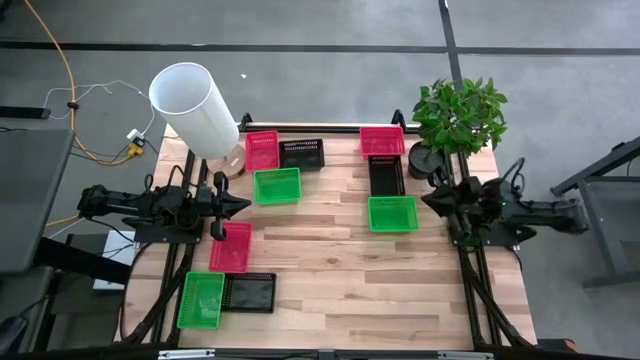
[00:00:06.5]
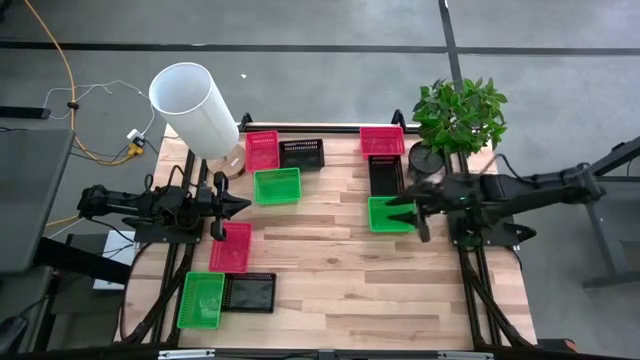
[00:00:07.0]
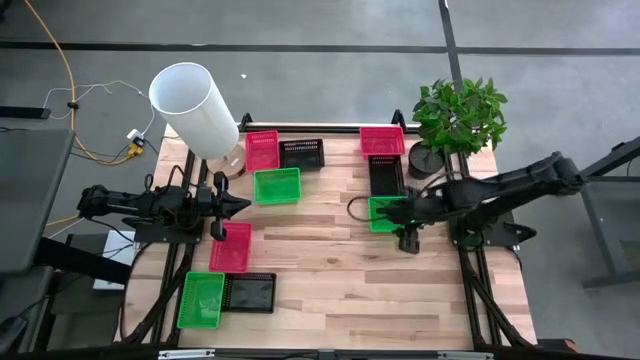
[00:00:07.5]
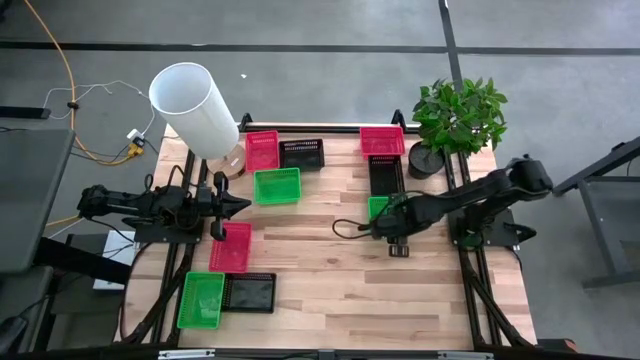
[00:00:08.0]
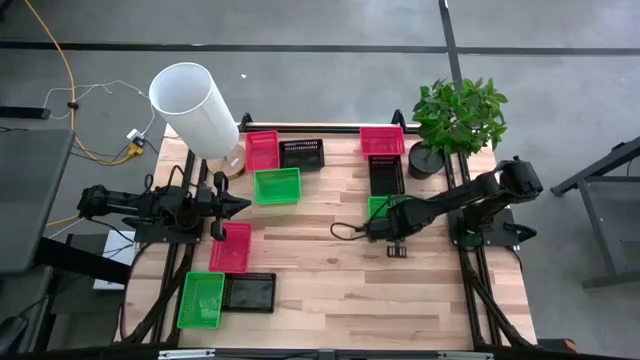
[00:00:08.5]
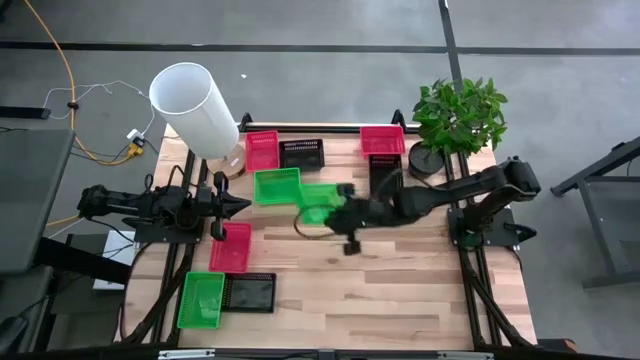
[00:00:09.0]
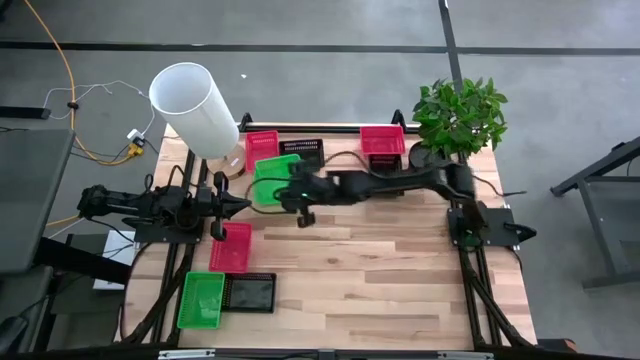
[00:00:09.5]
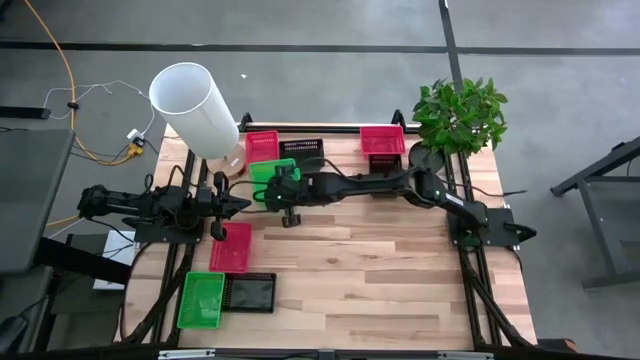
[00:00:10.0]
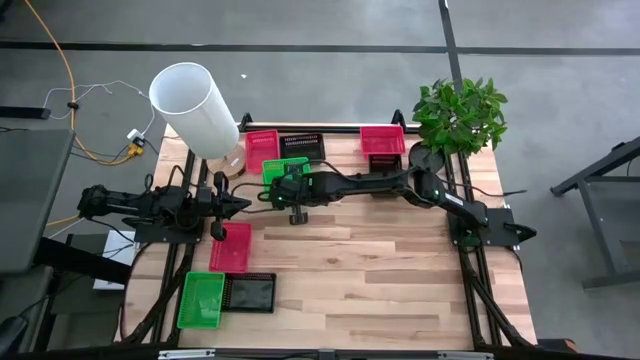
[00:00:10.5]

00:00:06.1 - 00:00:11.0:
Stack the right green basket on top of the top green basket

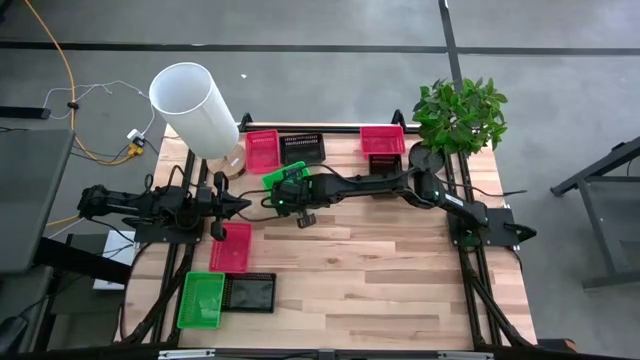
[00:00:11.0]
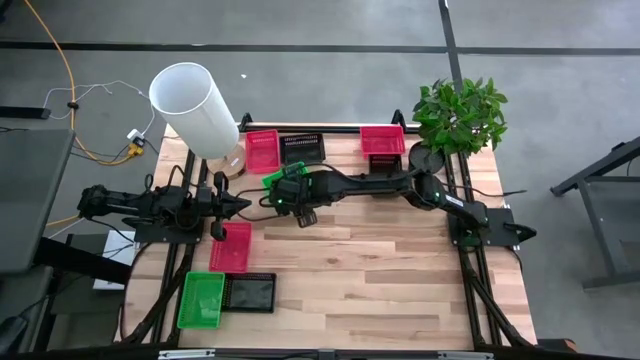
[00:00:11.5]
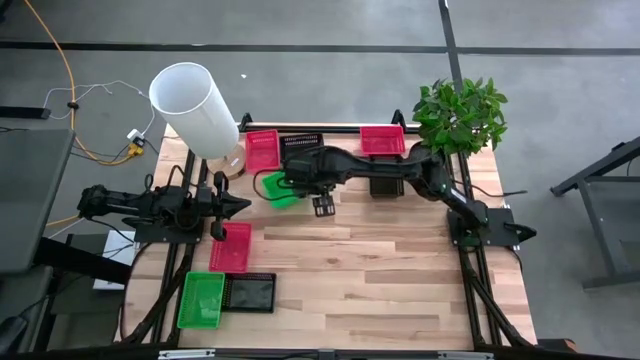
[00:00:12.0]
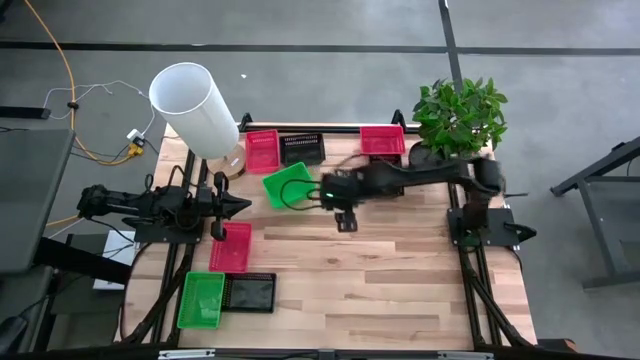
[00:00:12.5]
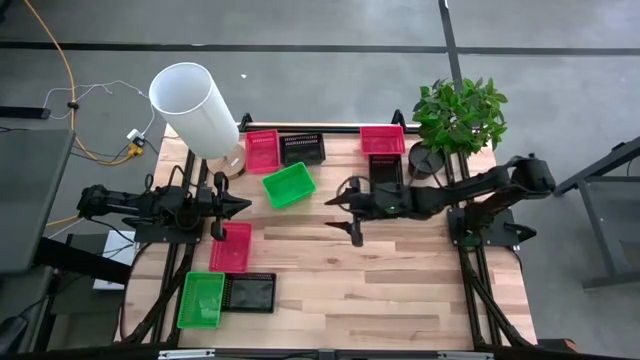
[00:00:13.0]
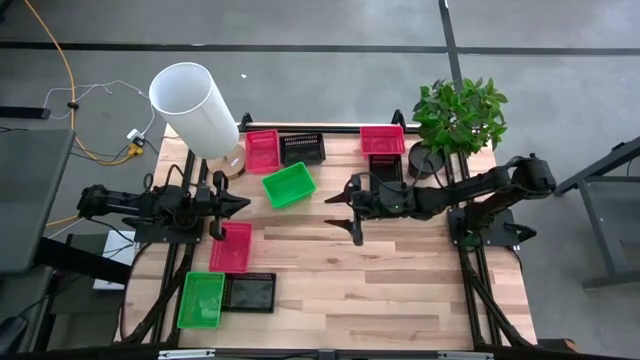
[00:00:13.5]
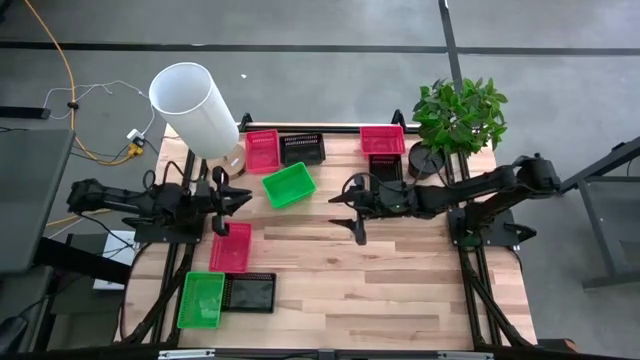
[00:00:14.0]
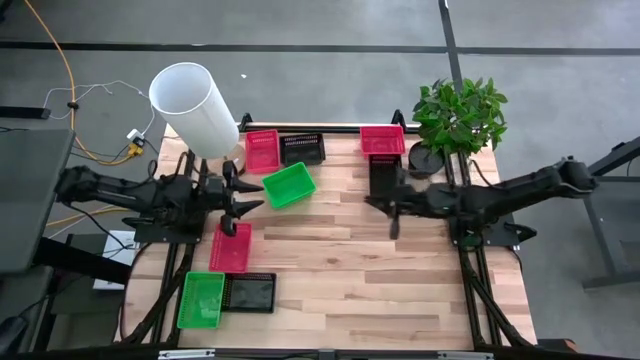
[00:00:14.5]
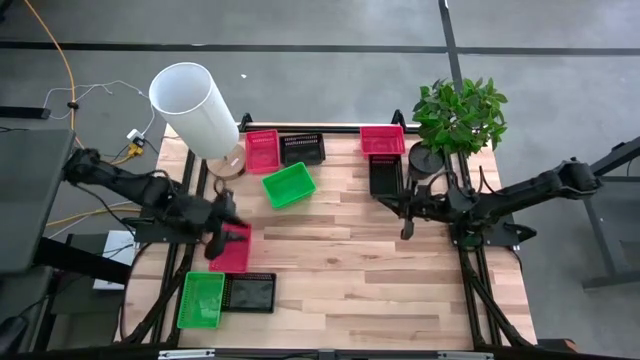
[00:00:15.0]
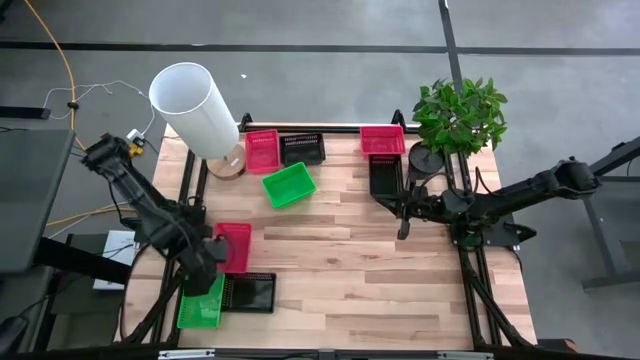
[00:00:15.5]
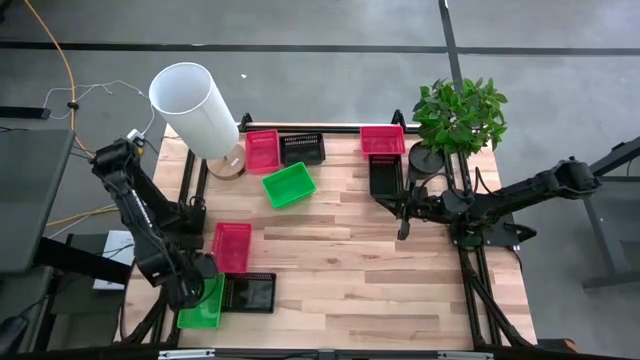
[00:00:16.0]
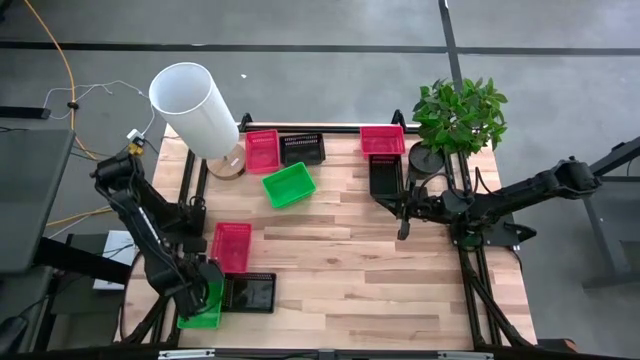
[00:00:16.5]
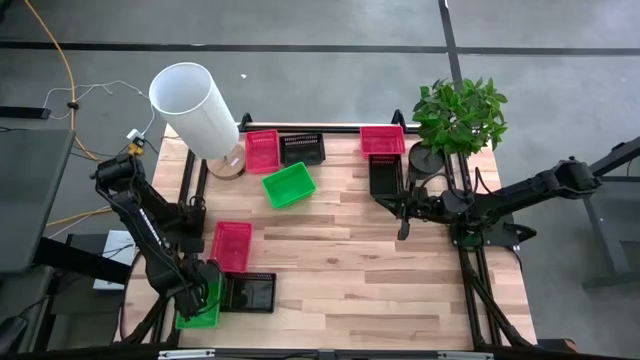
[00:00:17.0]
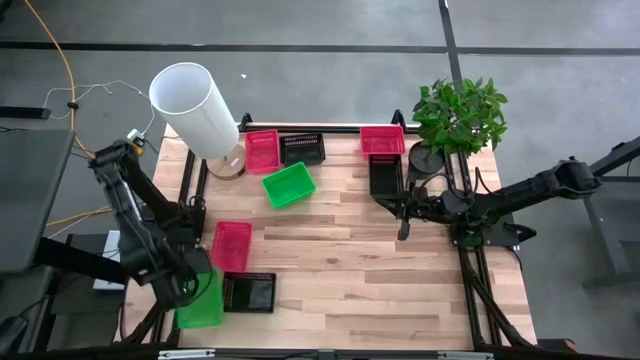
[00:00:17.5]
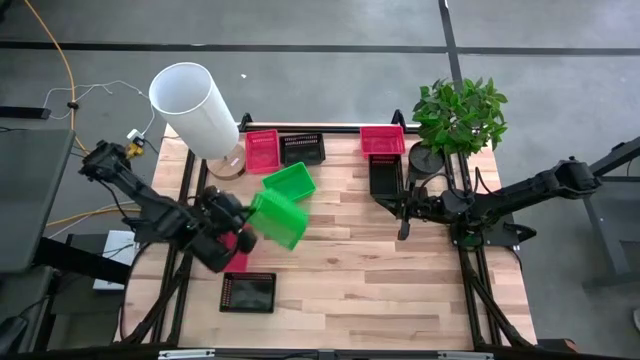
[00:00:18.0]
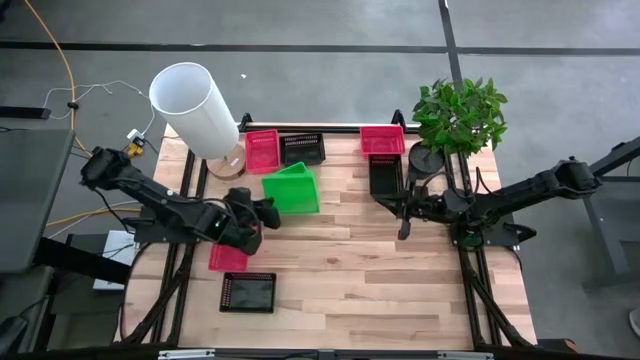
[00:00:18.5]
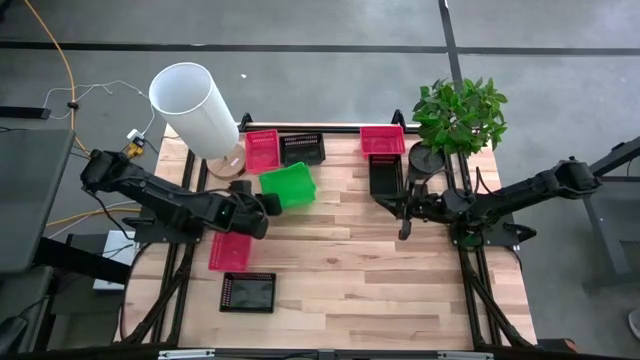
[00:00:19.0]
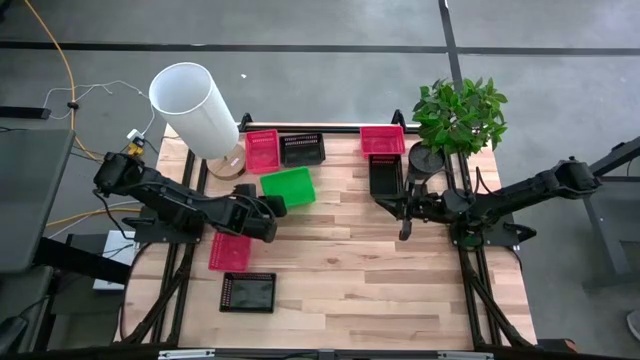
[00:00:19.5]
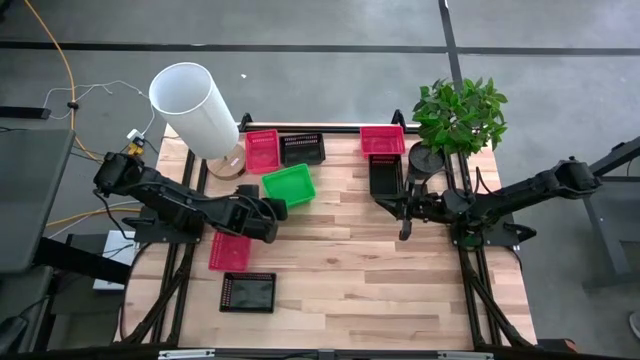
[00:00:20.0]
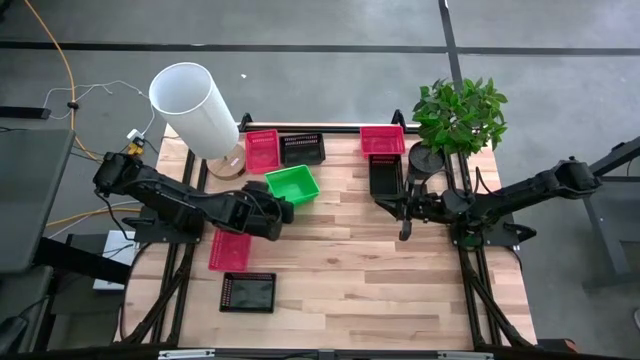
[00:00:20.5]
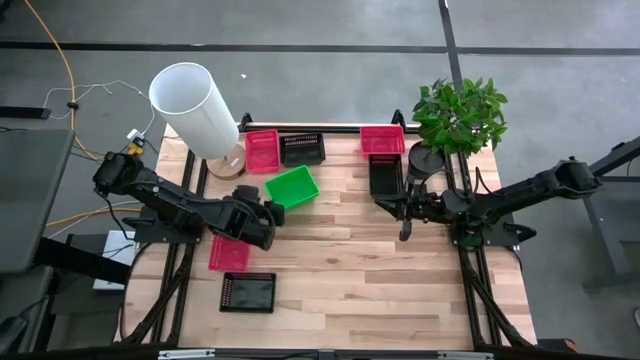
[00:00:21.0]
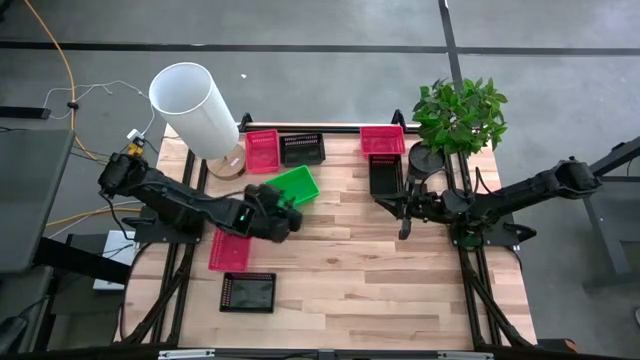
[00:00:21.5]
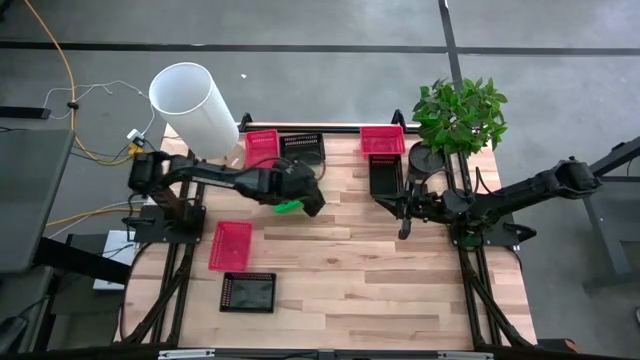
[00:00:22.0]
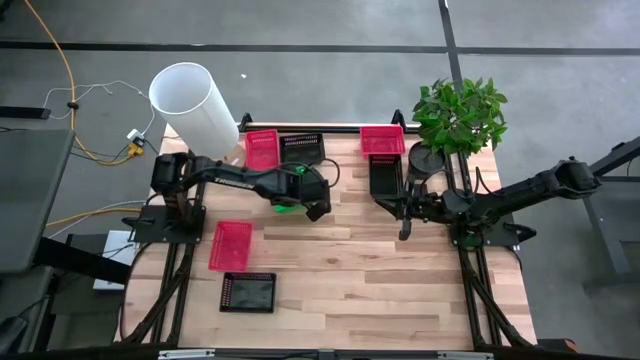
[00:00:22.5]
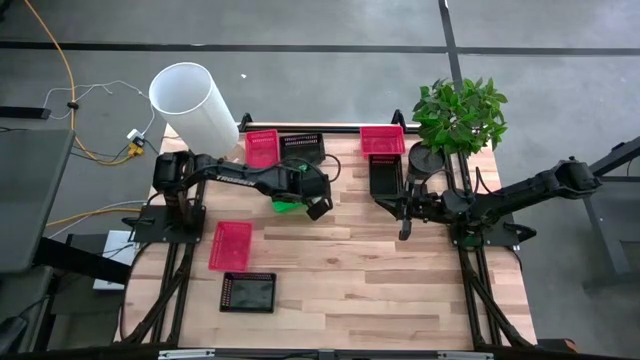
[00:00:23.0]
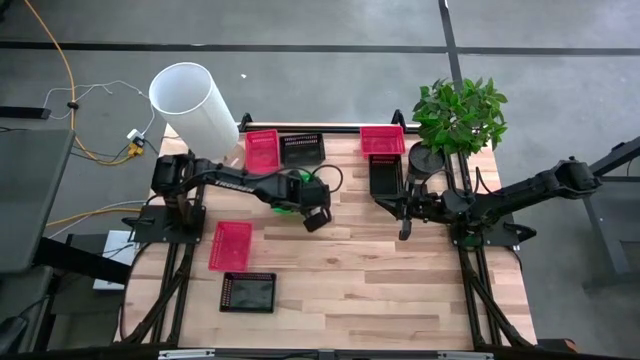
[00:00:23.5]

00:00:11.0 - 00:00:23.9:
Stack the bottom green basket on top of the top green basket

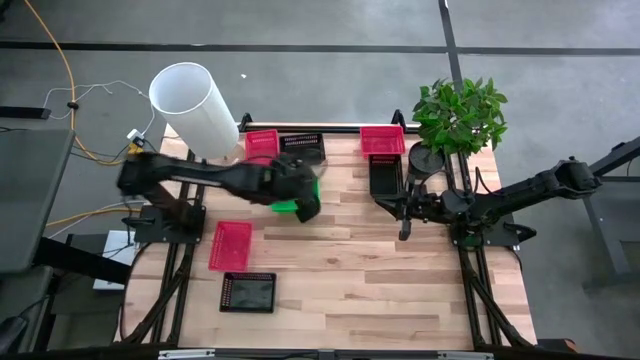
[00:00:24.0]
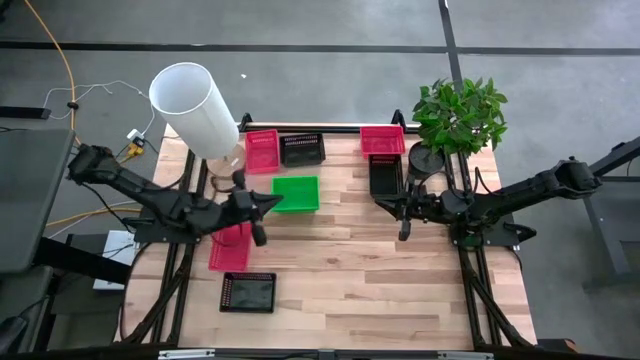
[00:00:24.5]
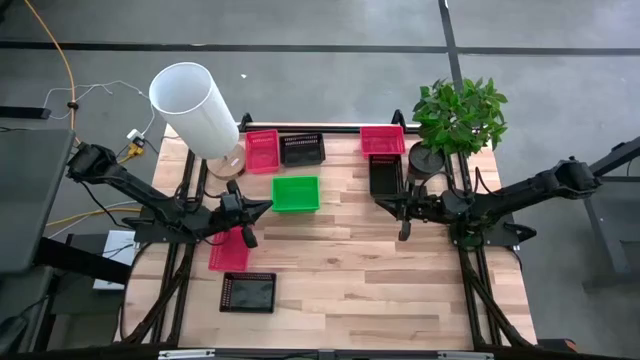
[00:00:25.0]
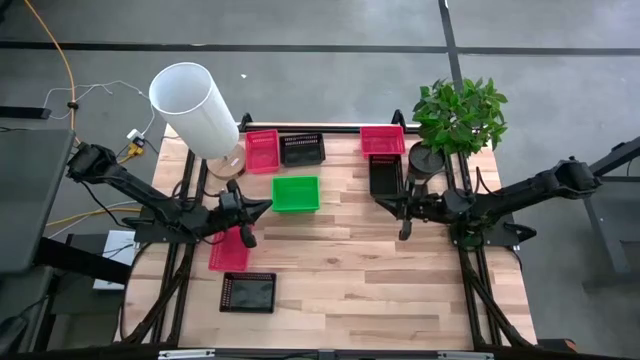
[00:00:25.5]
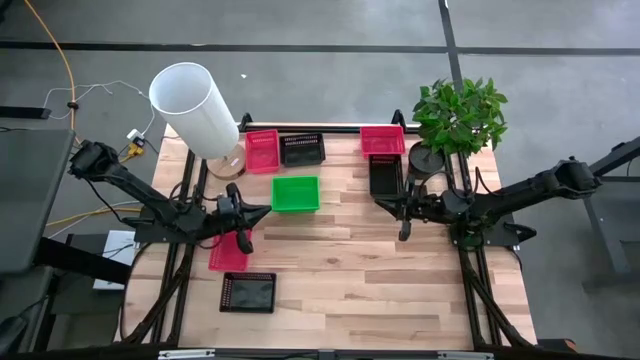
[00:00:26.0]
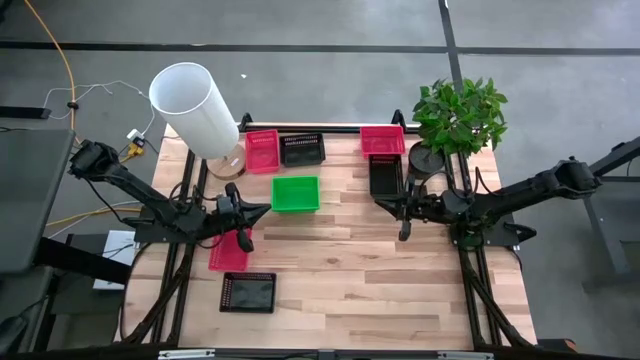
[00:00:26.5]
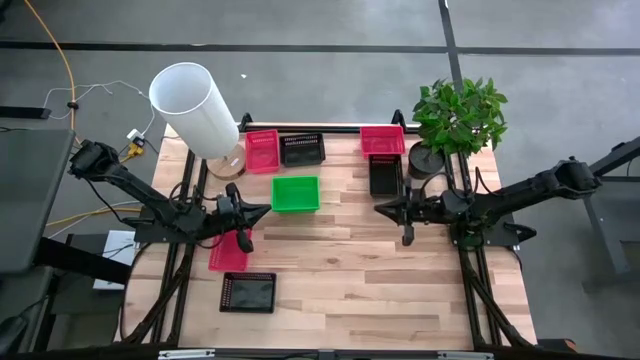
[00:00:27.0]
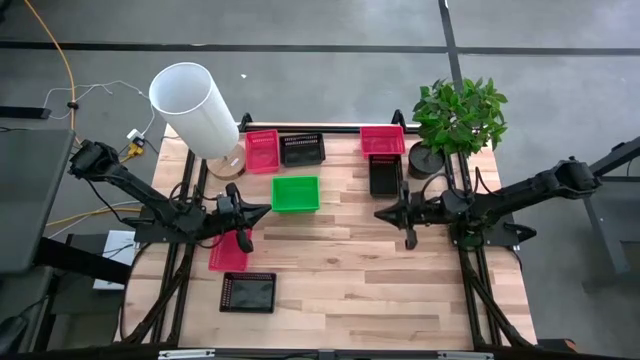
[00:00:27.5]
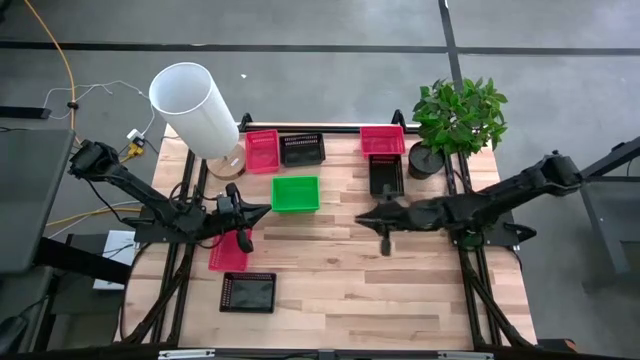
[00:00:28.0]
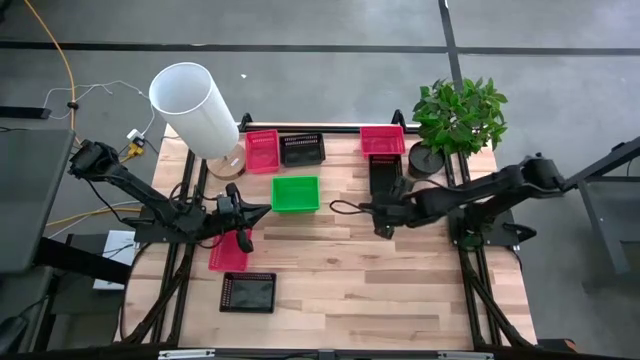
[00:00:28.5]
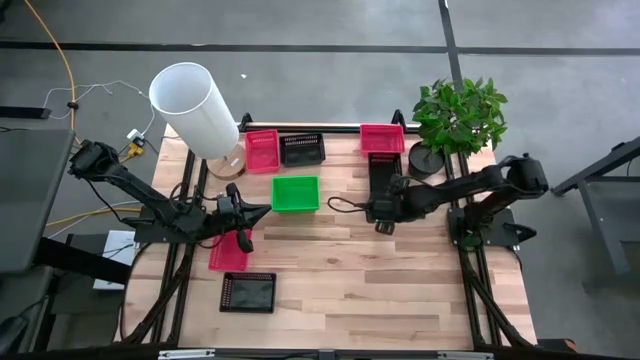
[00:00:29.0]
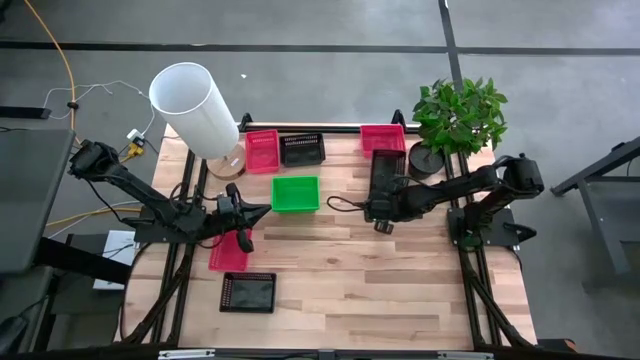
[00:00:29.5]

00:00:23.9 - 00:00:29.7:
Stack the right top black basket on top of the left top black basket
